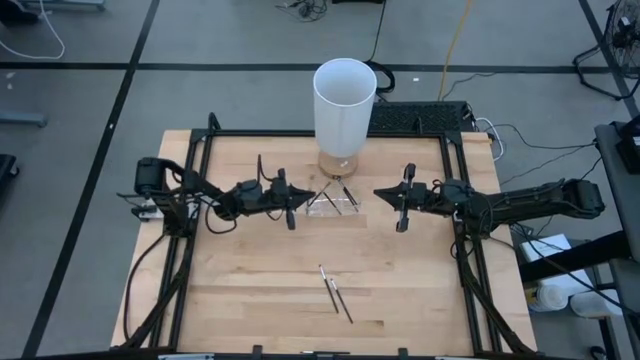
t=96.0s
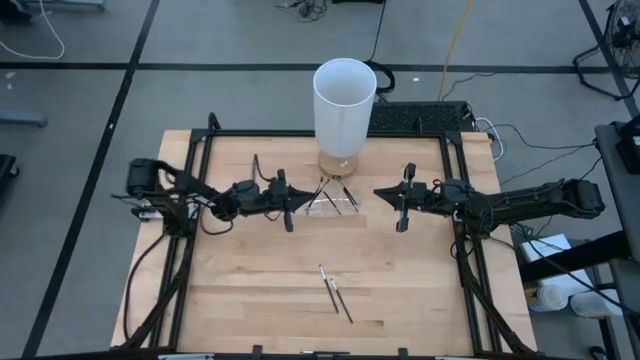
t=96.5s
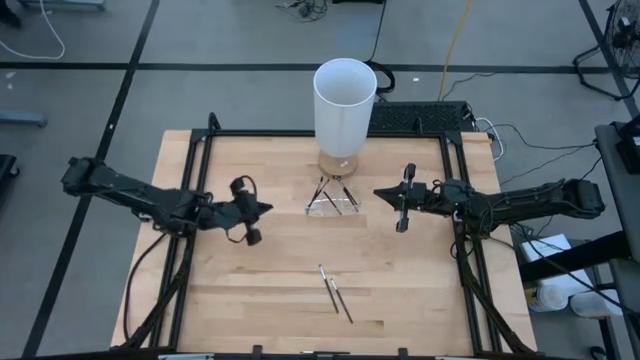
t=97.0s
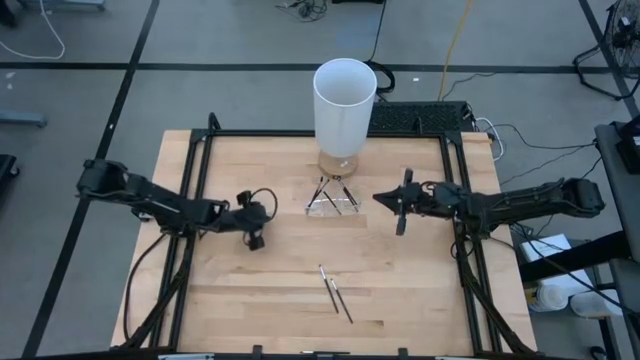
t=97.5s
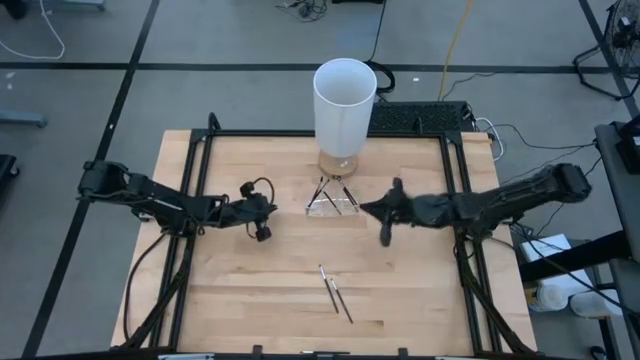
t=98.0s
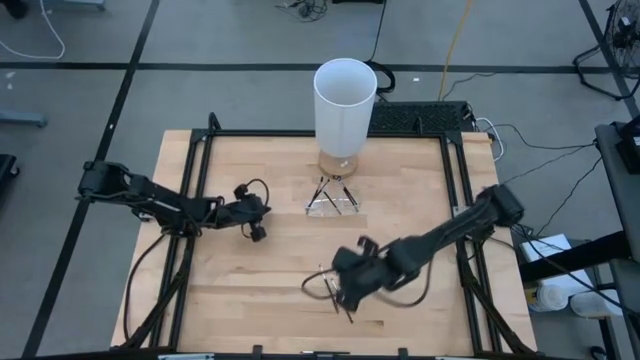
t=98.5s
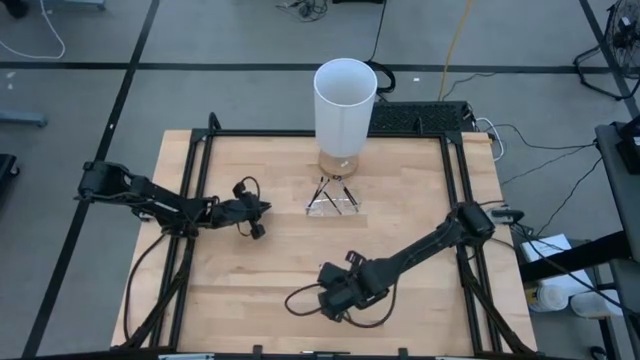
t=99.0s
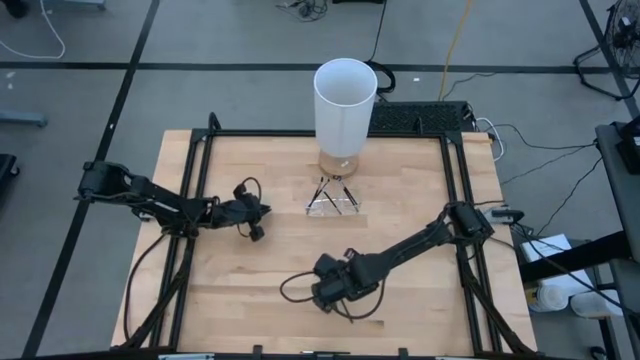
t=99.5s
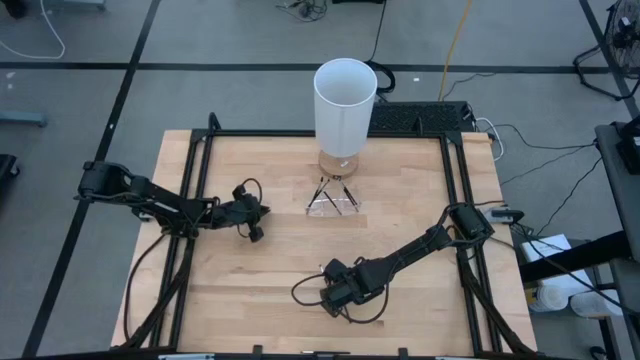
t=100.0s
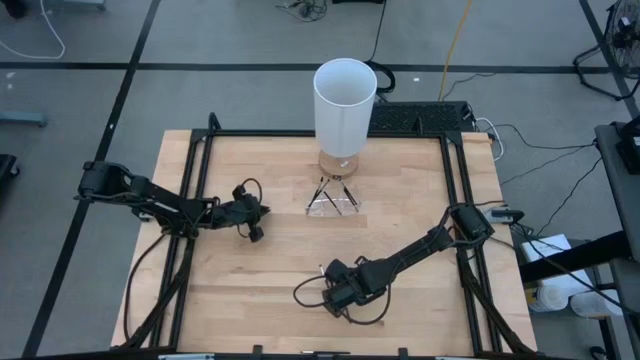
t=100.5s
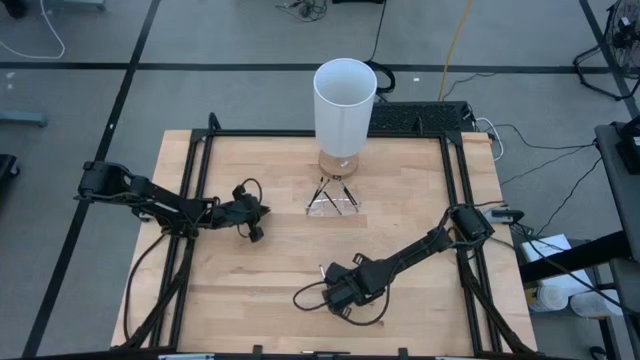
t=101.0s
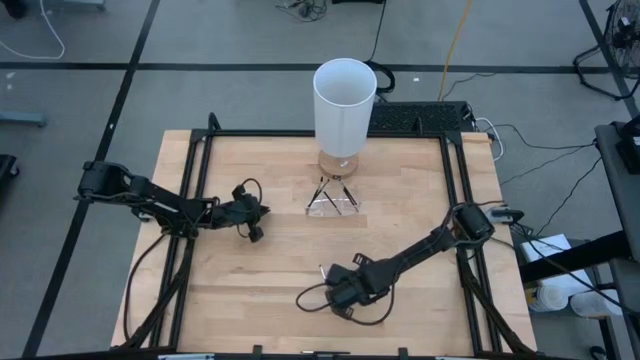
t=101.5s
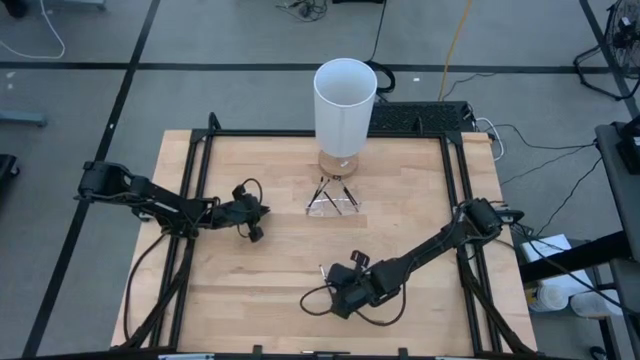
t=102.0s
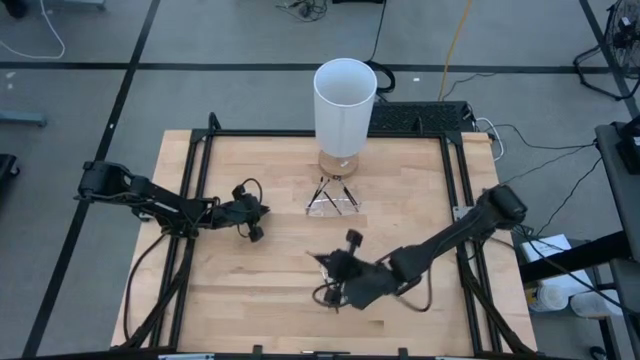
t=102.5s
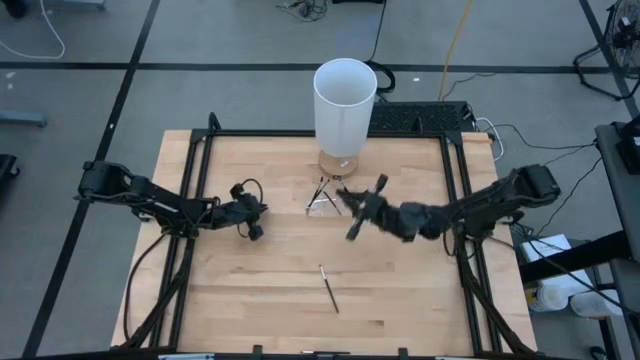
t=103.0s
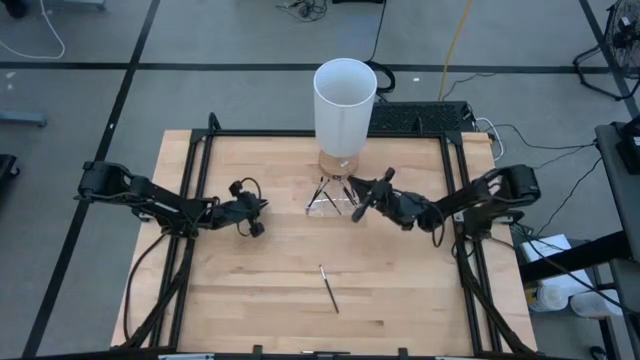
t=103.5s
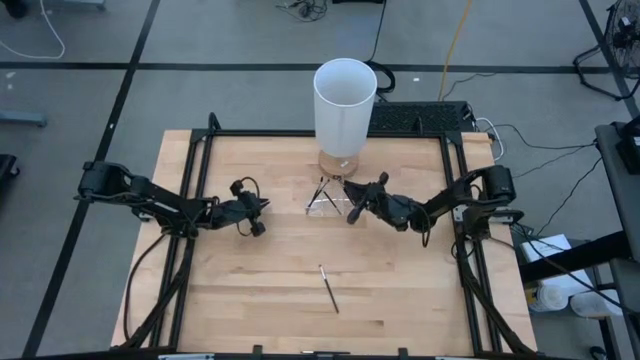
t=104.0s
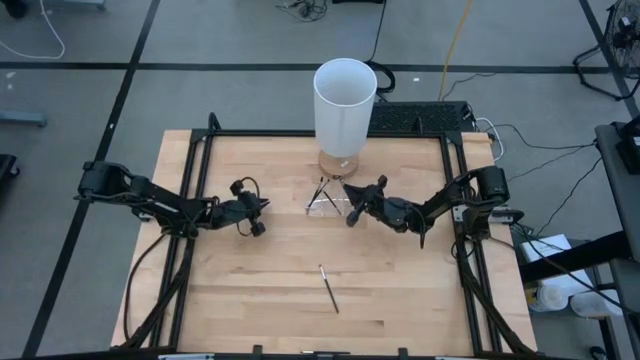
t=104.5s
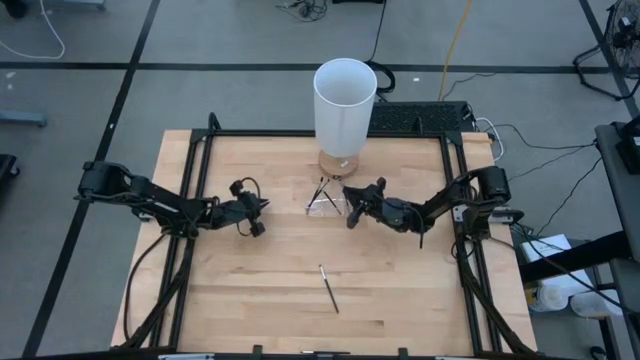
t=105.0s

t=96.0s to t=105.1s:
Task: Put items in baskets/containers
Put the eyeshadow brush into the transparent organizer

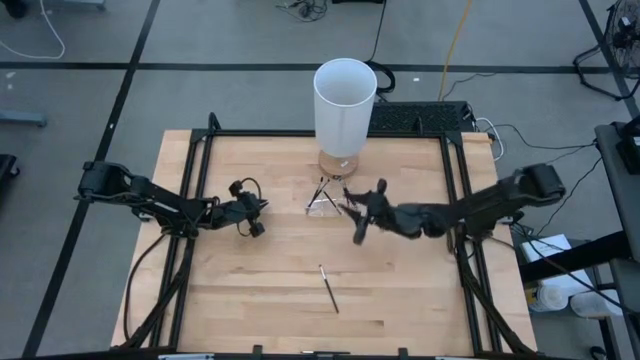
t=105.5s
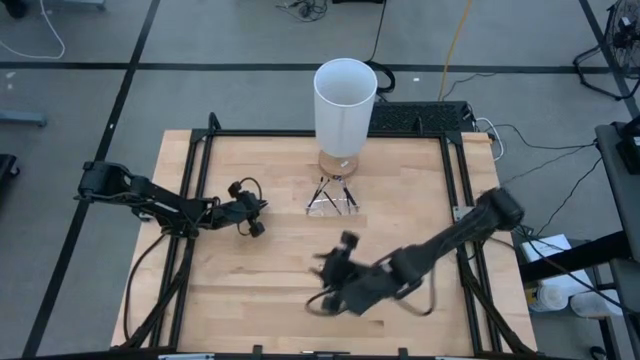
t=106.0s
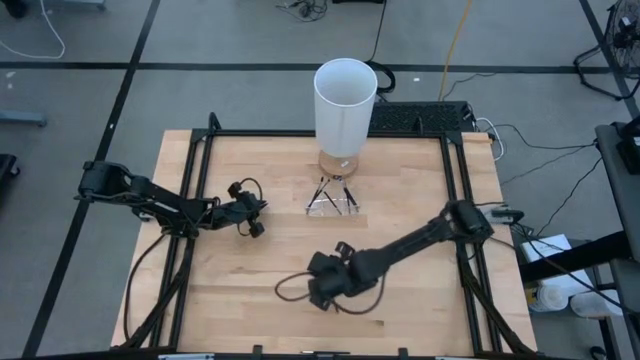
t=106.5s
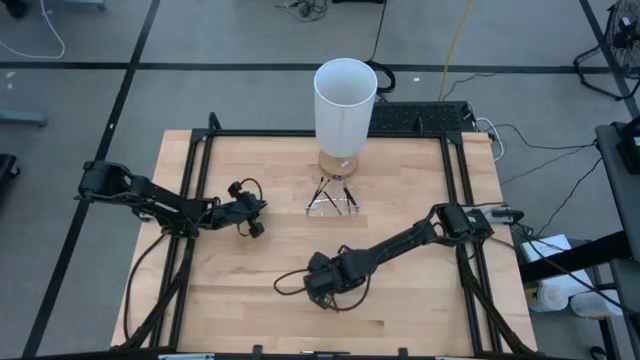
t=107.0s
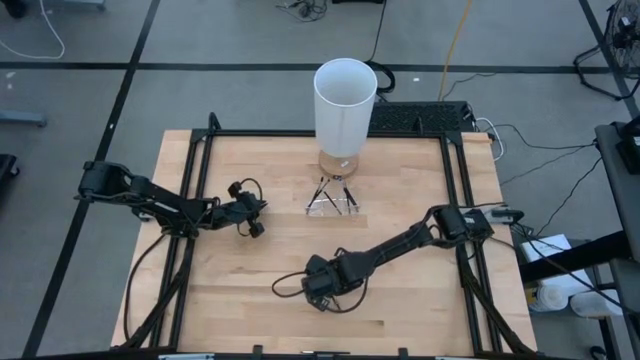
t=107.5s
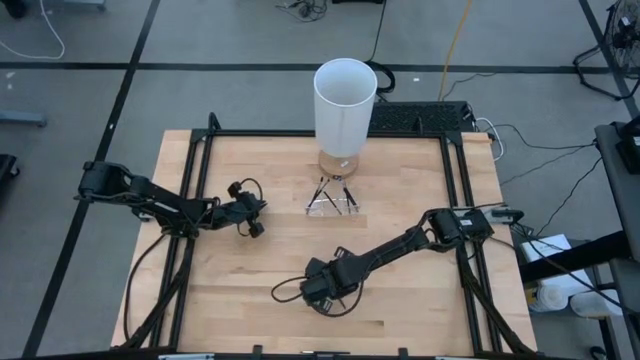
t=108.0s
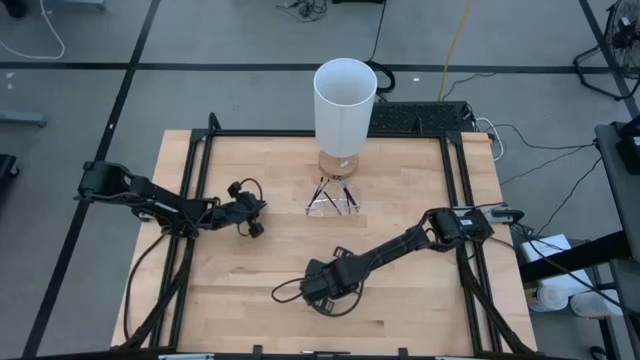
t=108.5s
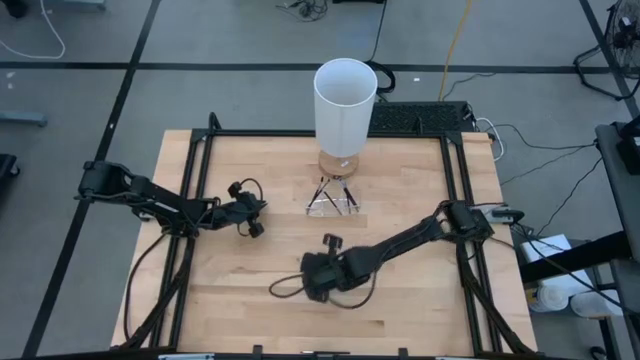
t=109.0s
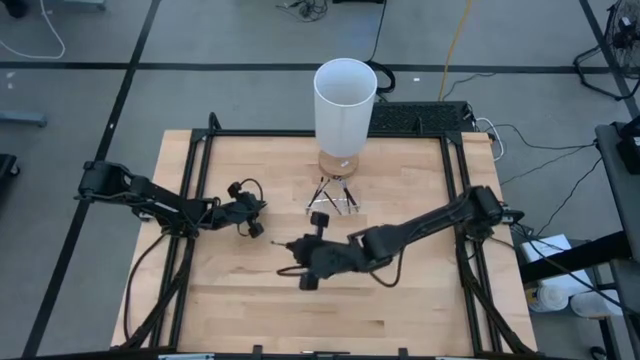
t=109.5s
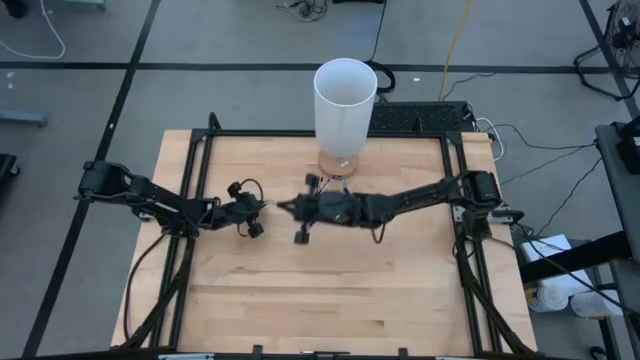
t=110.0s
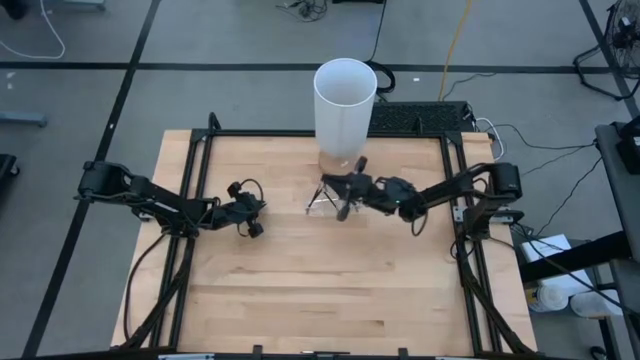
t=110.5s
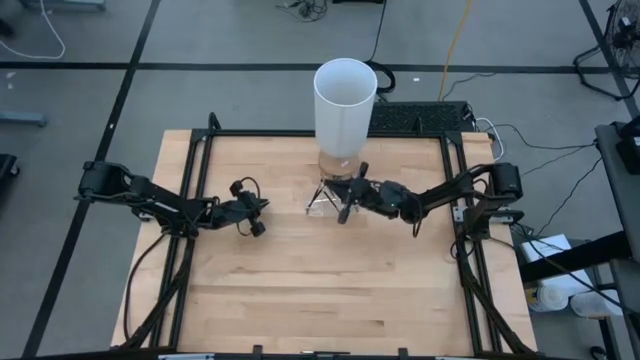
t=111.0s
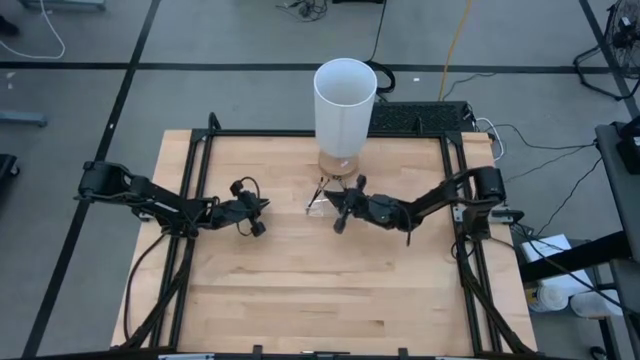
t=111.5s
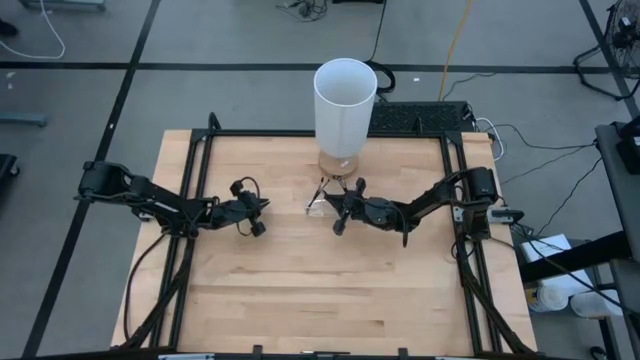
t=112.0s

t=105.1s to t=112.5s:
Put the eyeshadow brush into the transparent organizer

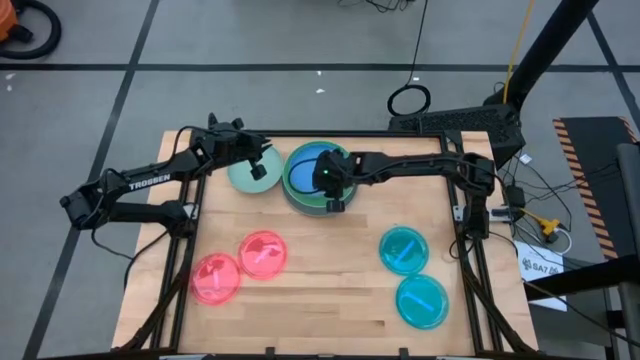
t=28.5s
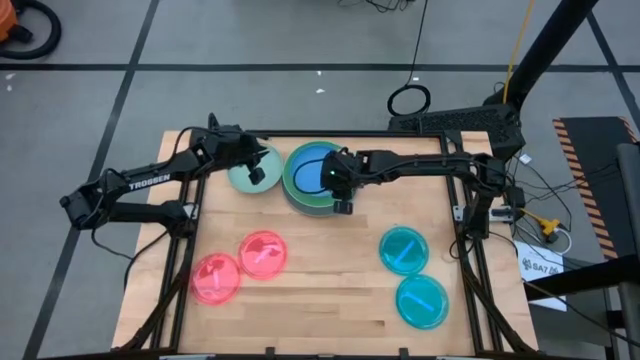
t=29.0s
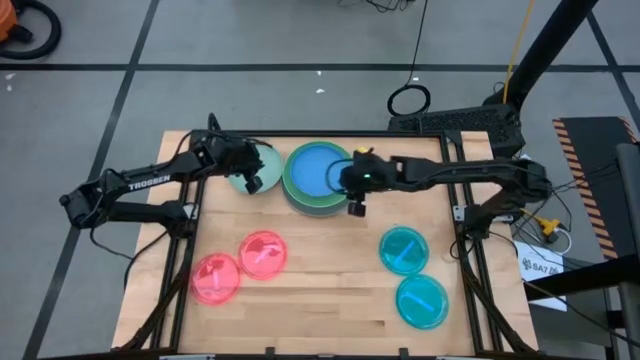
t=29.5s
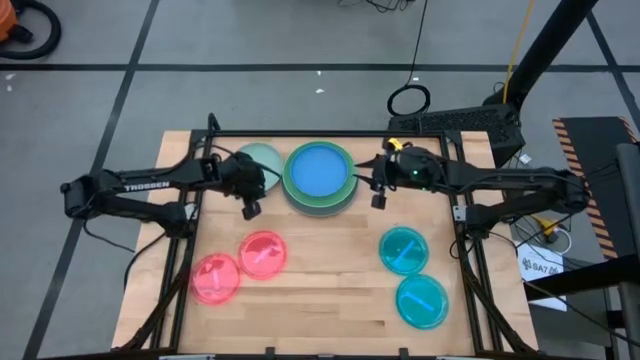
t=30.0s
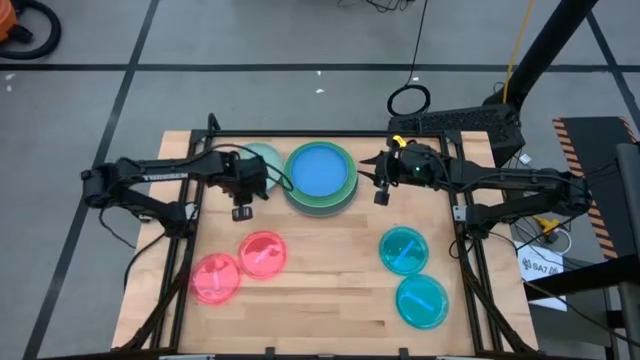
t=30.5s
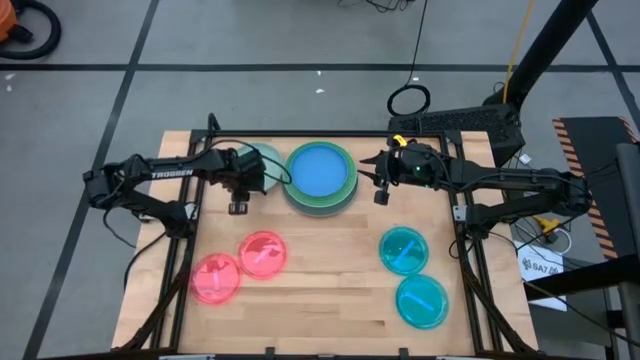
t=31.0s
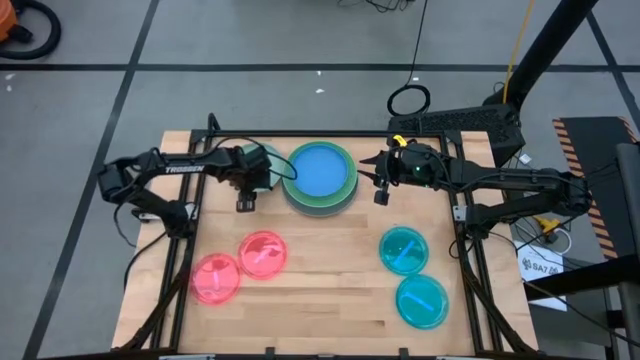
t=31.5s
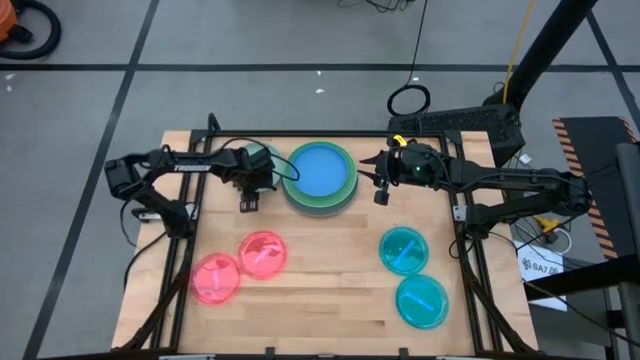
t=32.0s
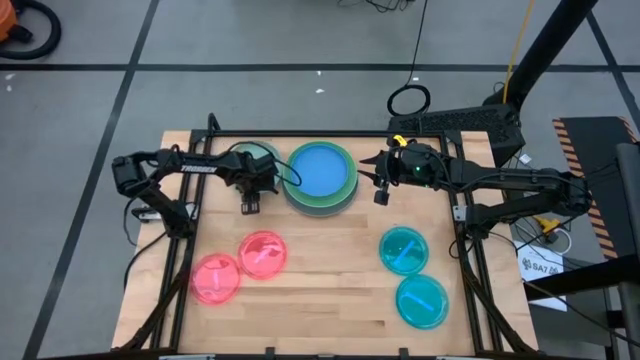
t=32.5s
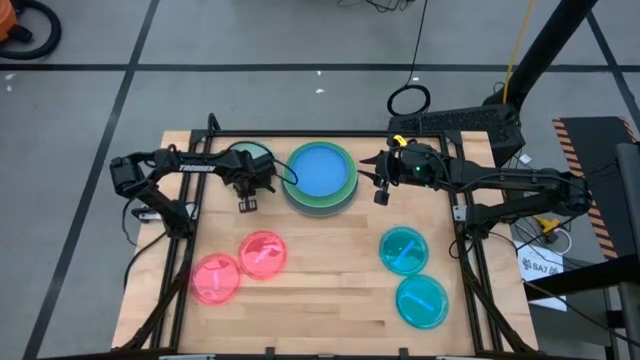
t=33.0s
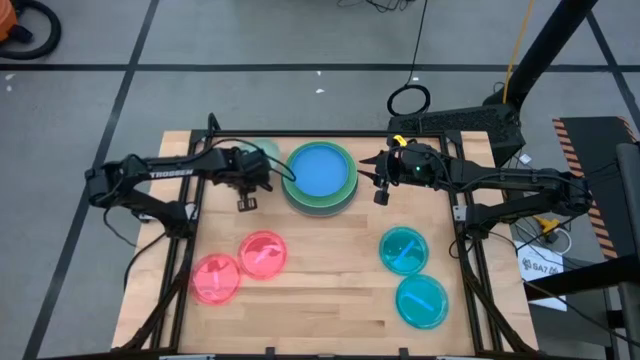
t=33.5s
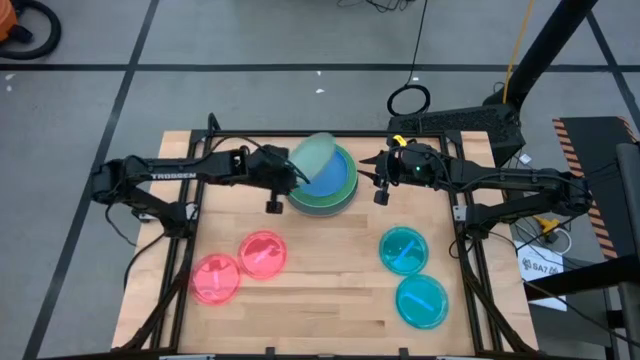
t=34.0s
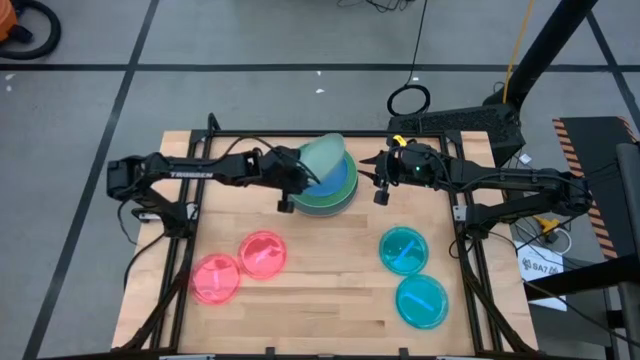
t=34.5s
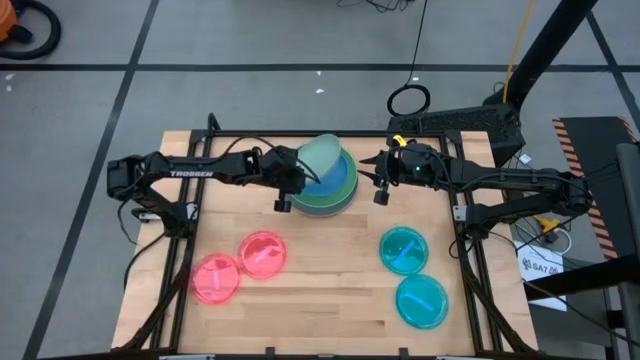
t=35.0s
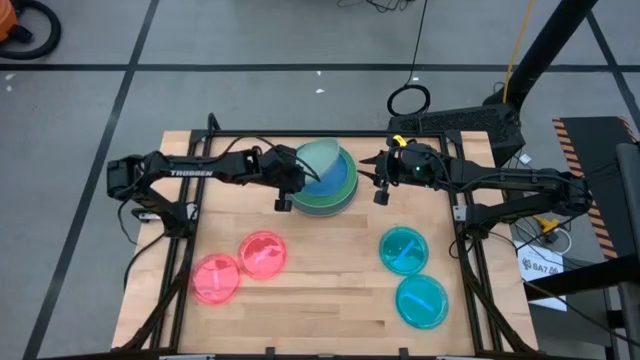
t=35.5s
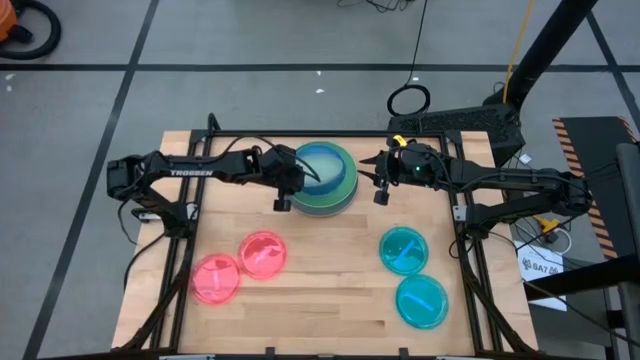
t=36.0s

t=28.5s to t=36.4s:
Task: Stack plastic plates
Stack the light green plate on the dark blue plate
